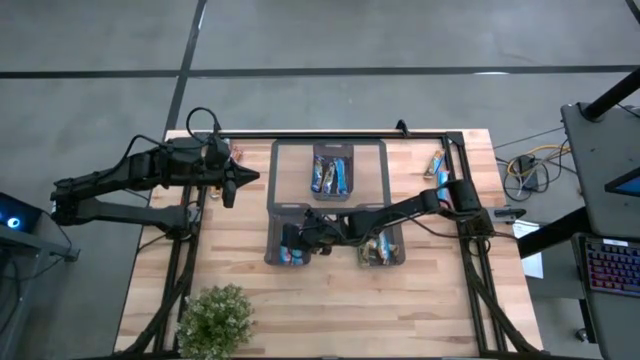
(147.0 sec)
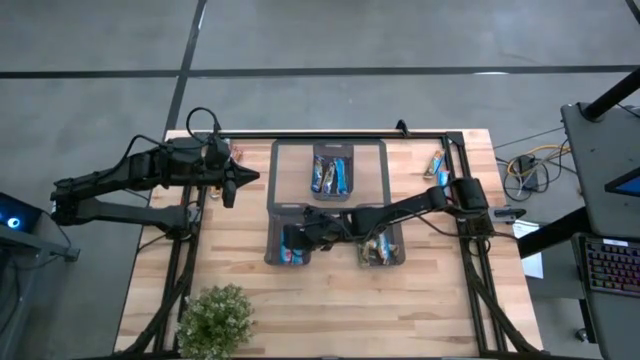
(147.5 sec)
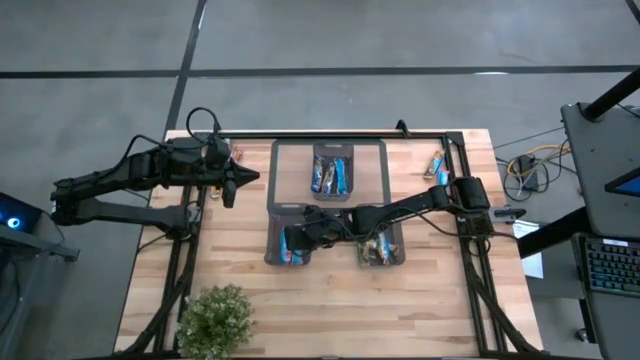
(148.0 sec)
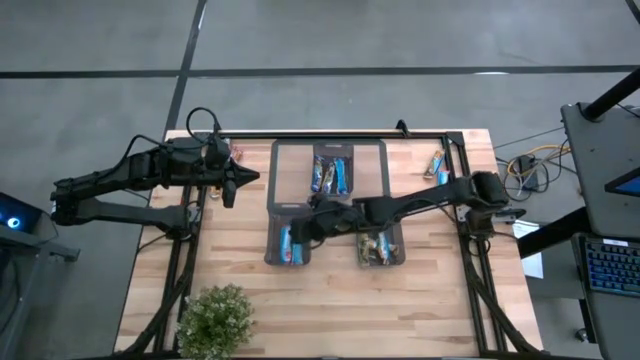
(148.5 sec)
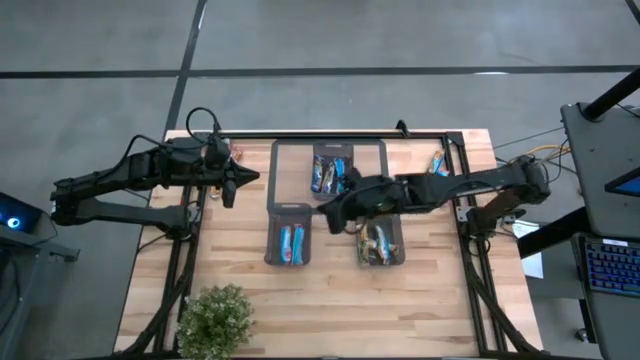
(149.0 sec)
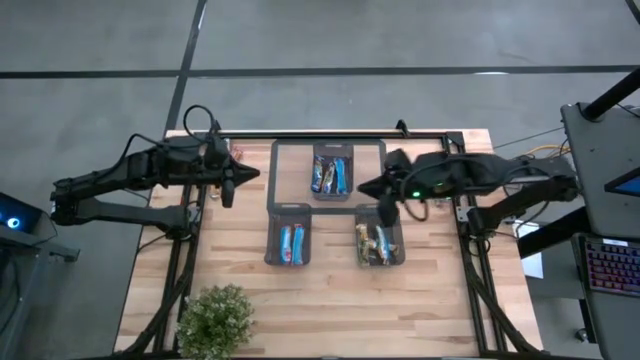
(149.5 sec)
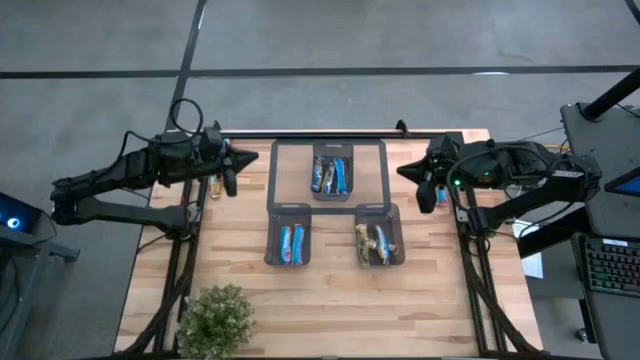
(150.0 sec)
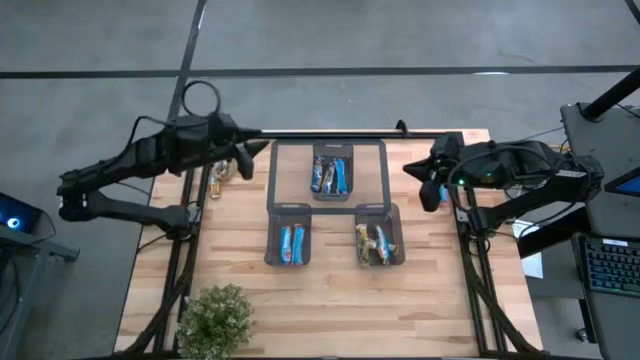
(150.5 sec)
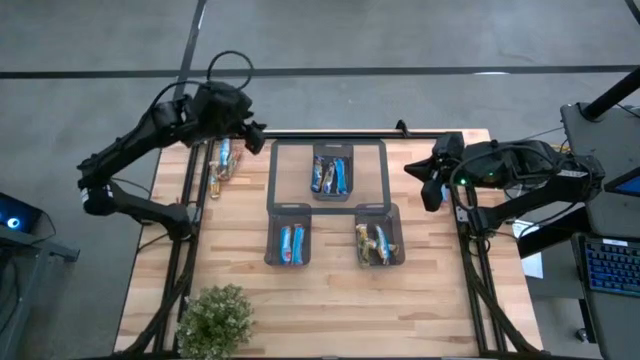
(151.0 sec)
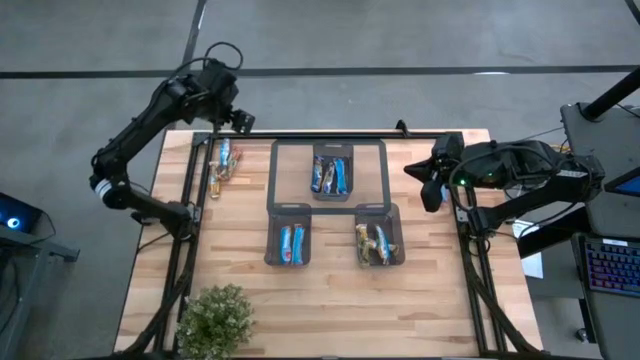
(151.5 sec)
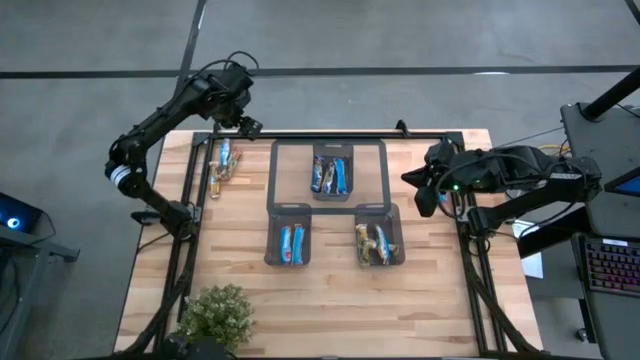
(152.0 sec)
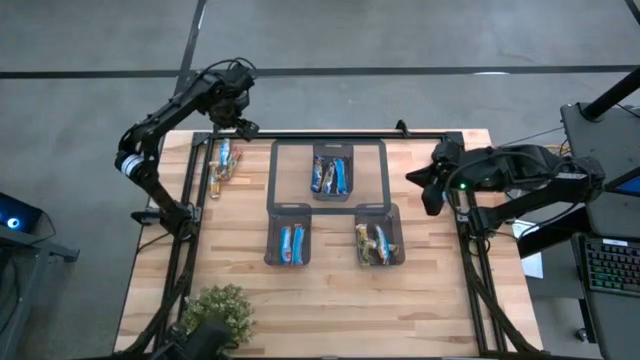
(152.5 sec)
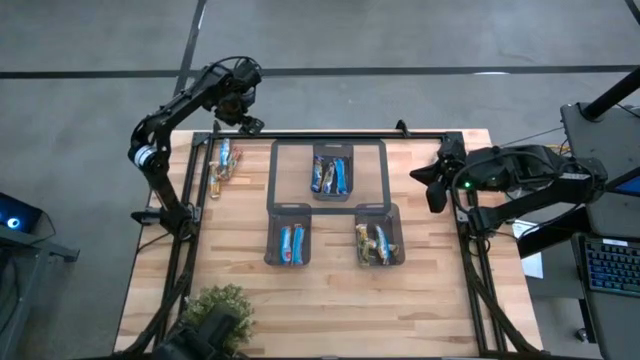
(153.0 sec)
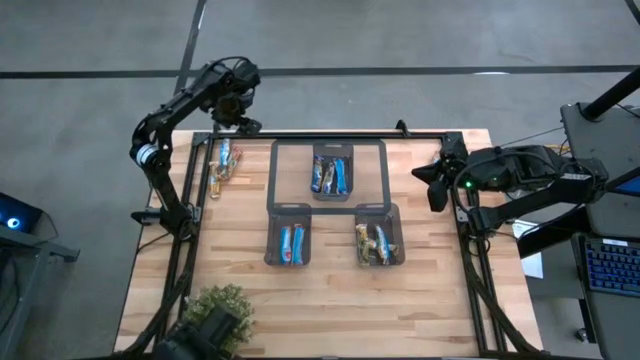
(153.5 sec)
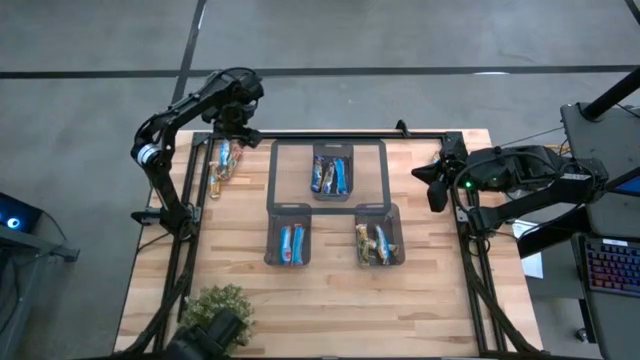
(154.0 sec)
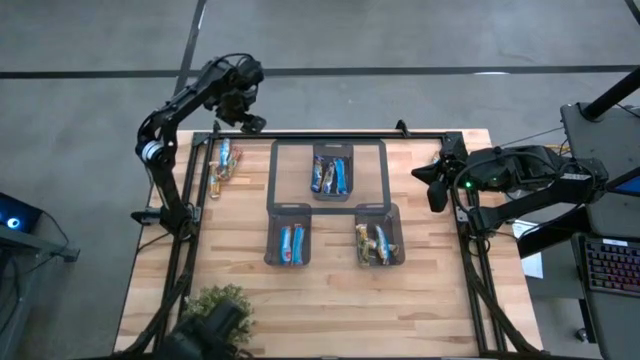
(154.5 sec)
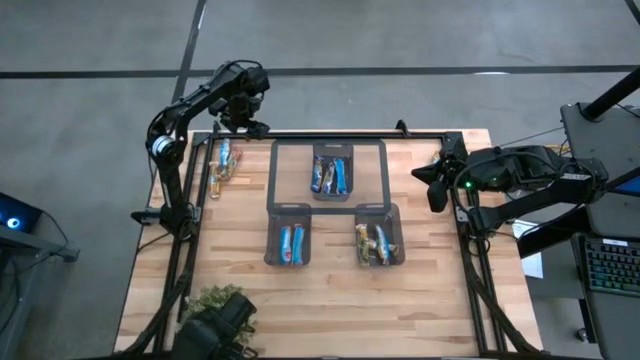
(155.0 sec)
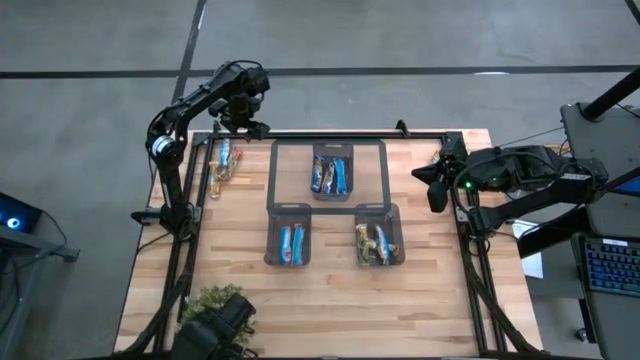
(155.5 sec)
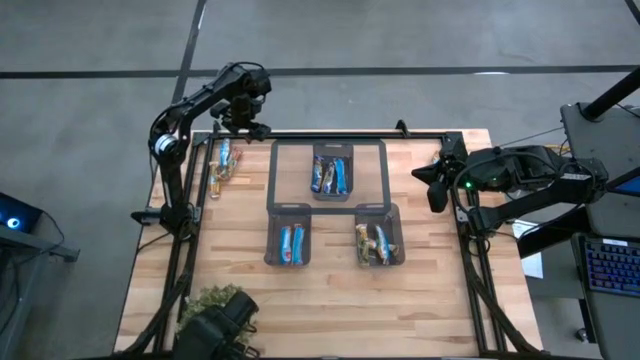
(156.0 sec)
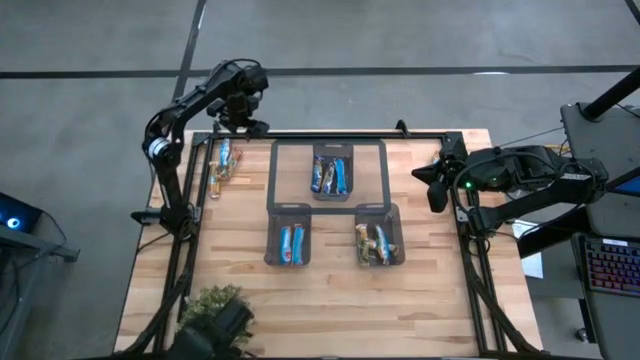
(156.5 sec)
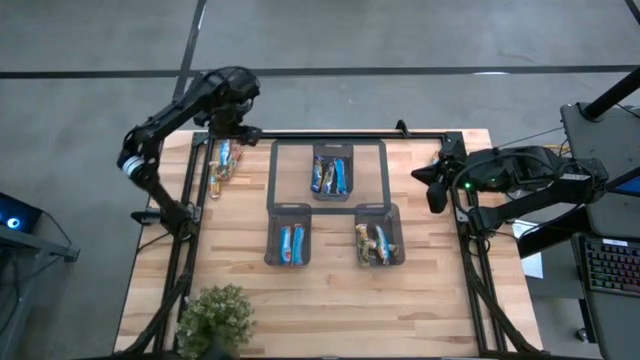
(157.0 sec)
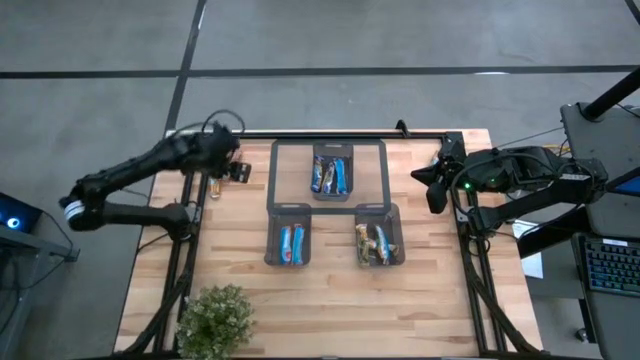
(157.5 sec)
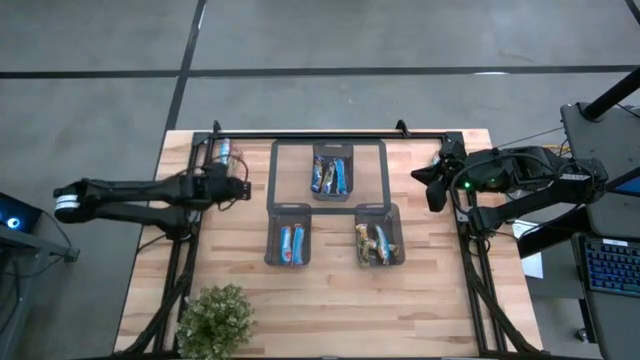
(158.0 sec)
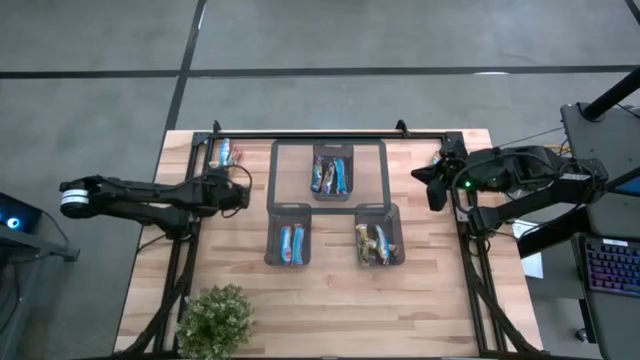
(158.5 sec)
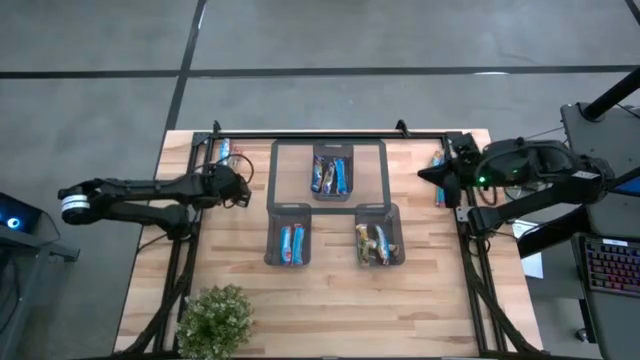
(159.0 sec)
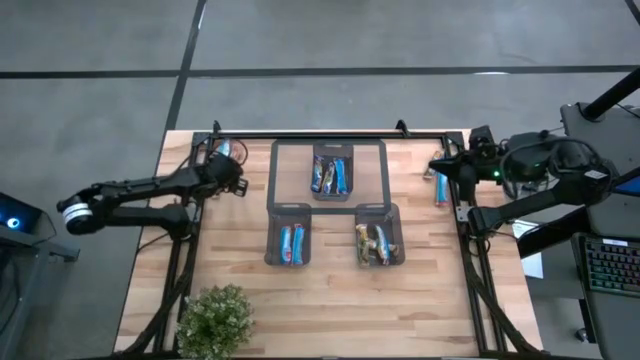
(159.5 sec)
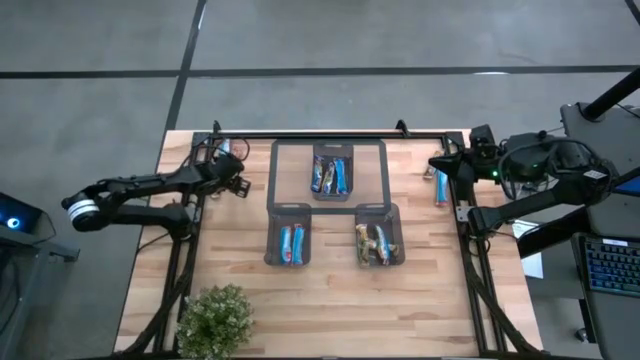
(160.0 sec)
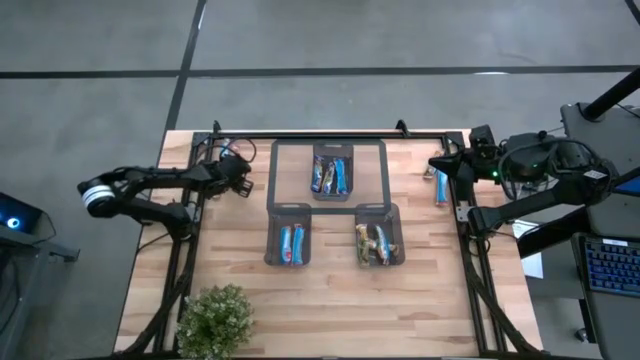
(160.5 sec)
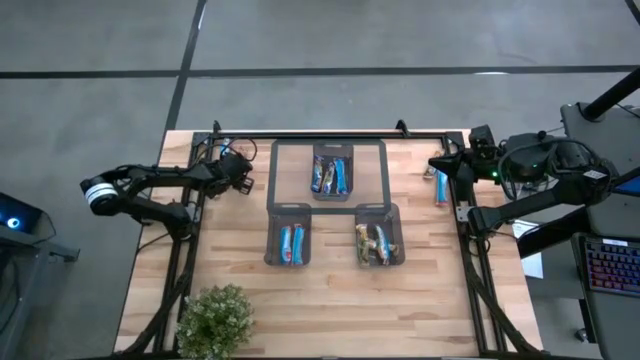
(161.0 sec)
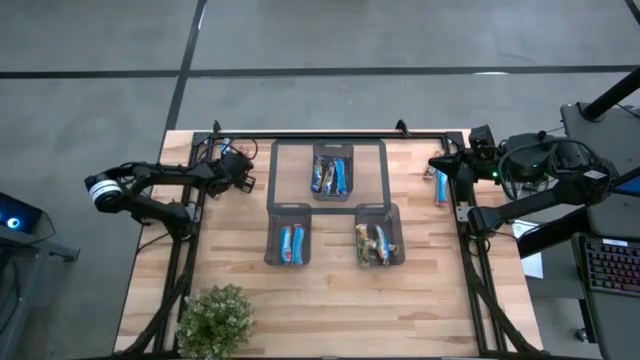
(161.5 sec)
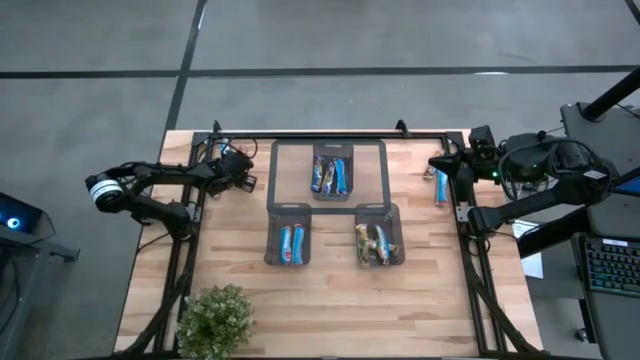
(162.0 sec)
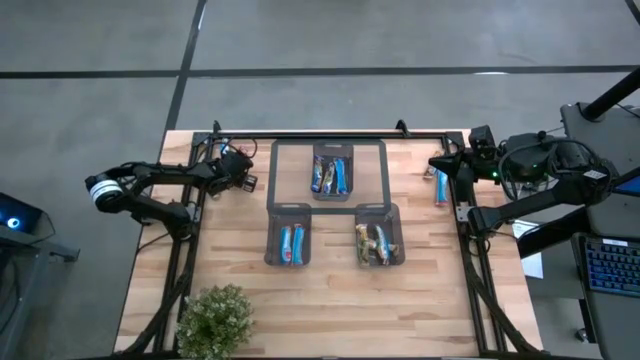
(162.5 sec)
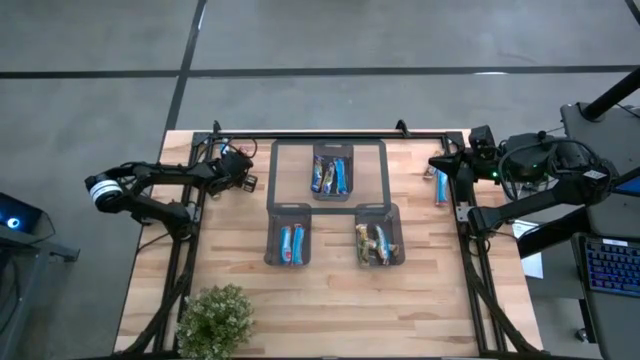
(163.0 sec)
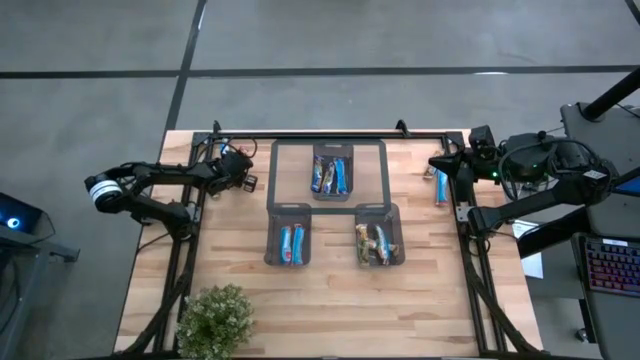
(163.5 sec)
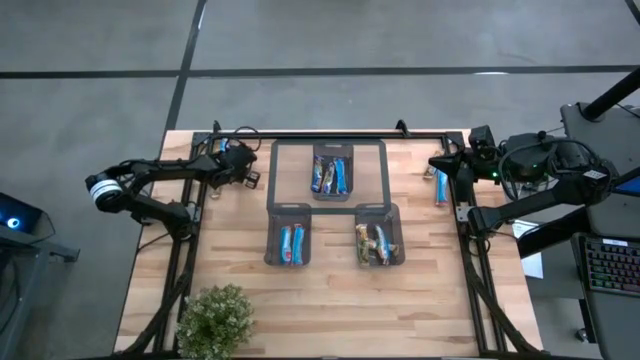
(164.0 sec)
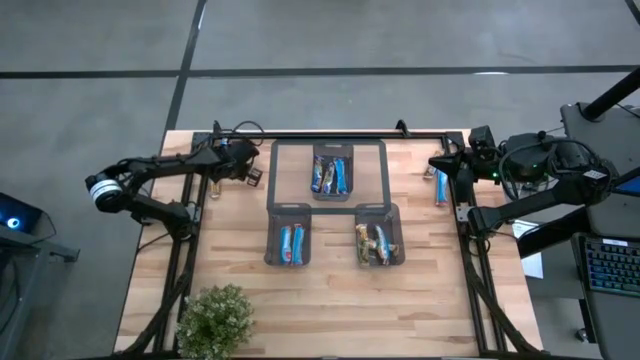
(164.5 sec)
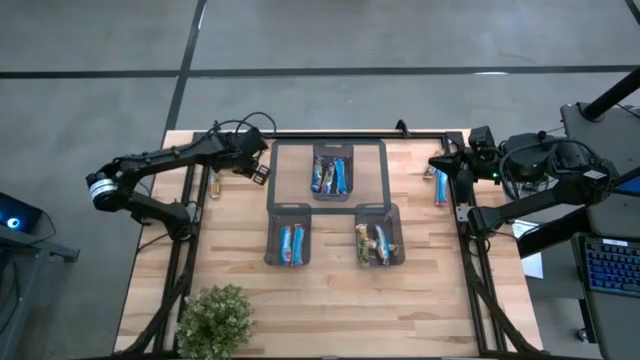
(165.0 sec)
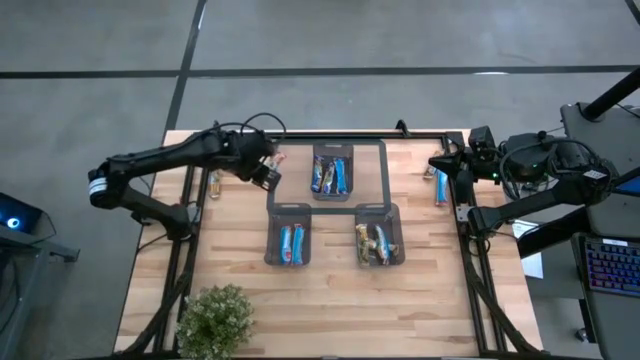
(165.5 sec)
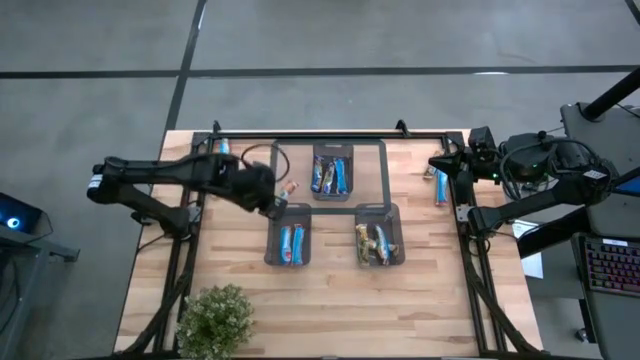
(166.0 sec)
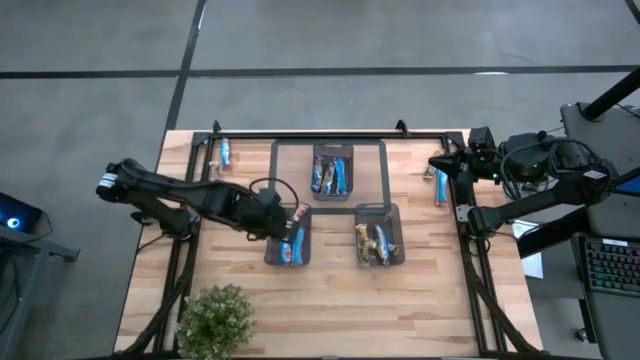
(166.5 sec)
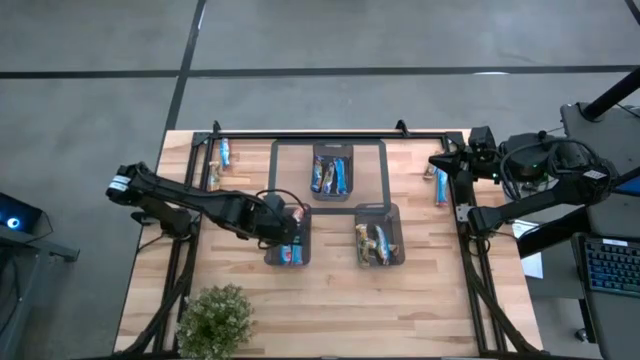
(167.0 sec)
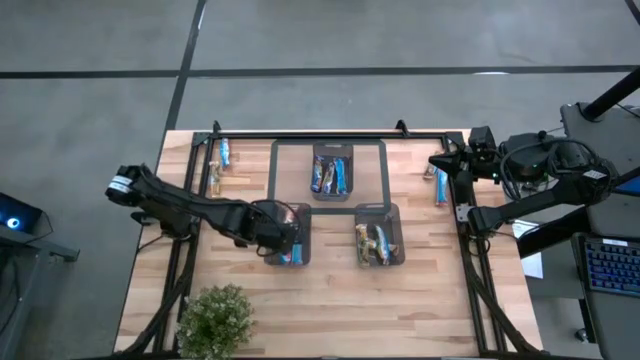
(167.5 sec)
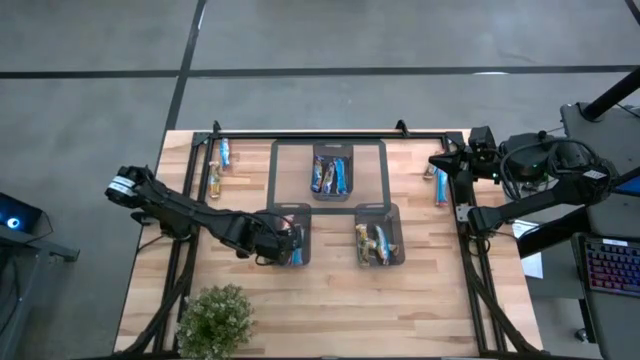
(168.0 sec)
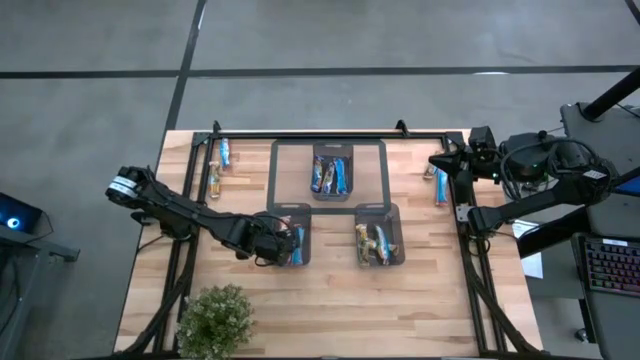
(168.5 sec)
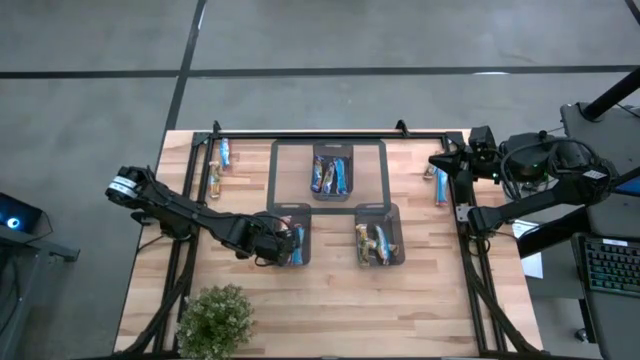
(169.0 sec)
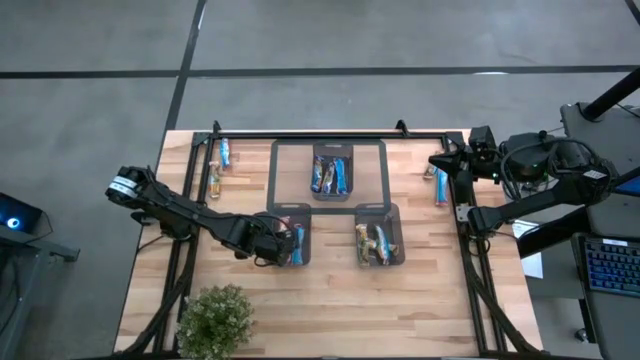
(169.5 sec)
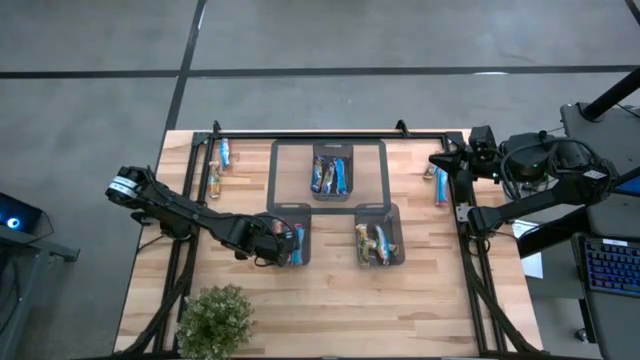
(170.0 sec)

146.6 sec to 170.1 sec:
Task: Pick and place Granola Bars by type
Put the red granola bar into the bottom left black bin
